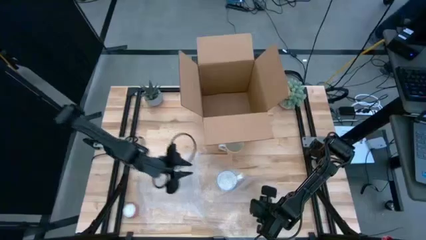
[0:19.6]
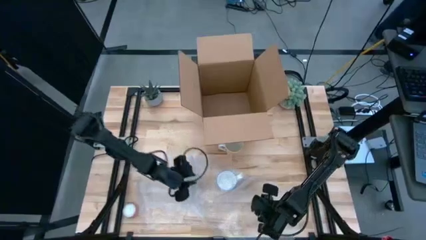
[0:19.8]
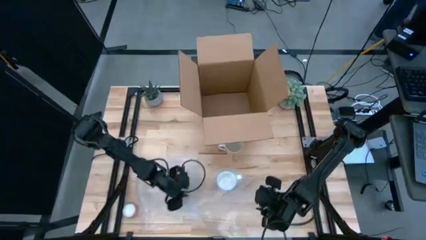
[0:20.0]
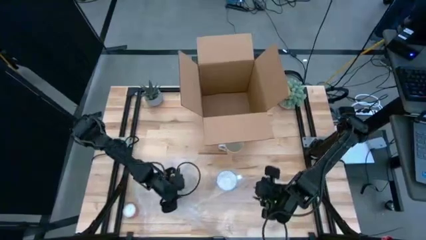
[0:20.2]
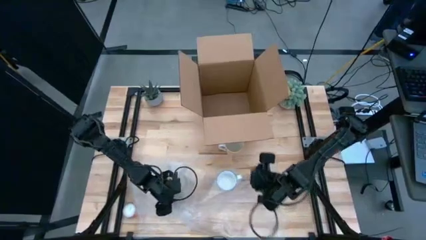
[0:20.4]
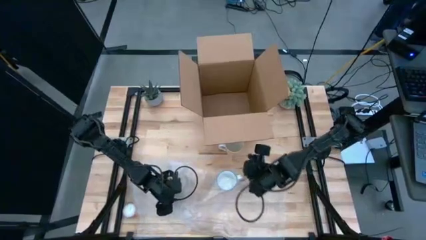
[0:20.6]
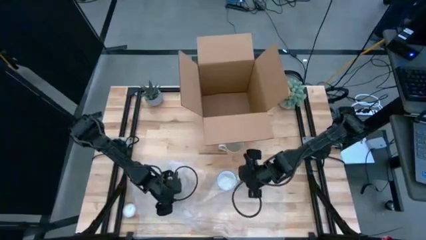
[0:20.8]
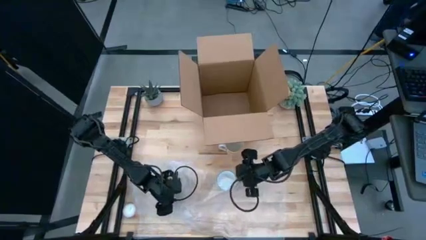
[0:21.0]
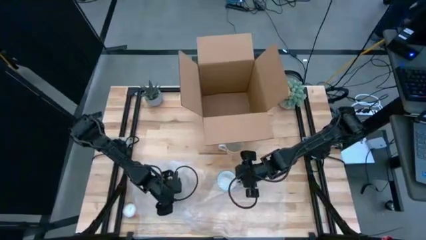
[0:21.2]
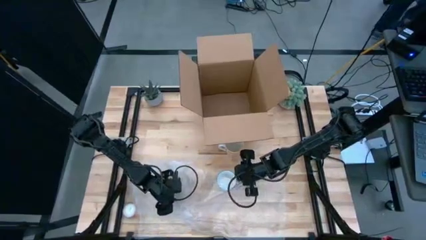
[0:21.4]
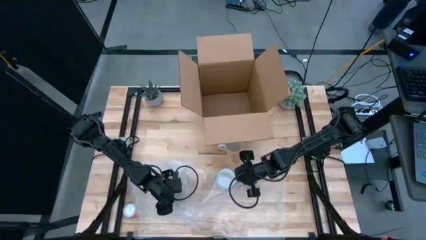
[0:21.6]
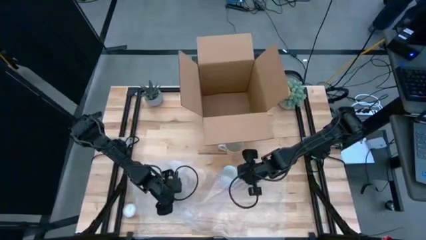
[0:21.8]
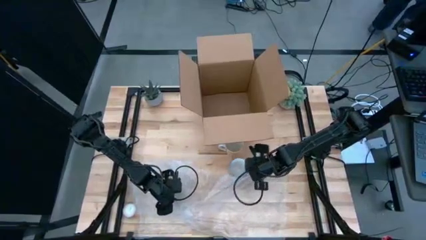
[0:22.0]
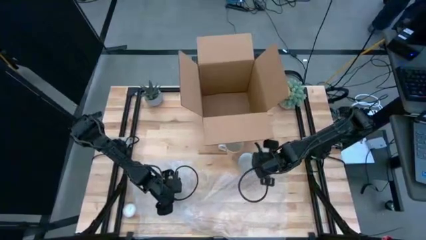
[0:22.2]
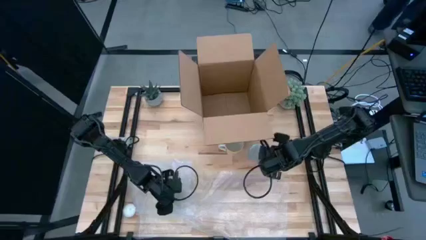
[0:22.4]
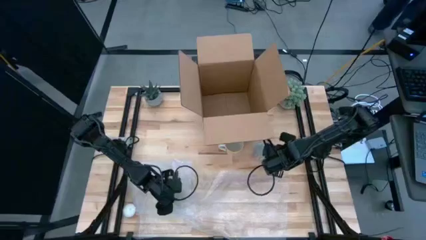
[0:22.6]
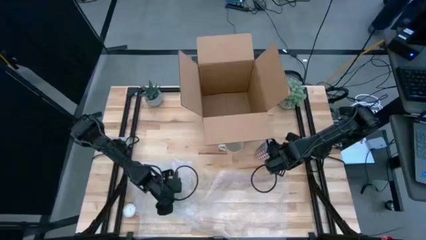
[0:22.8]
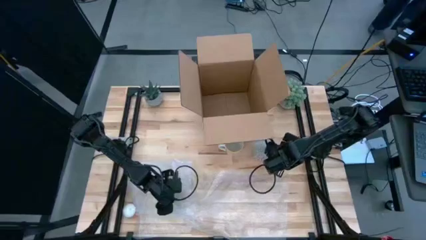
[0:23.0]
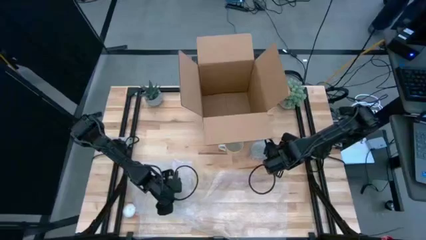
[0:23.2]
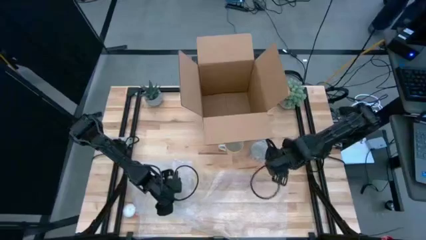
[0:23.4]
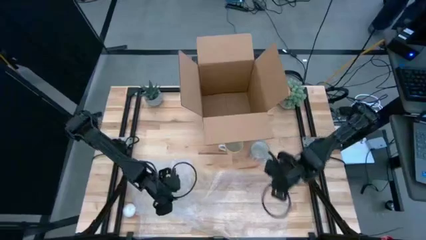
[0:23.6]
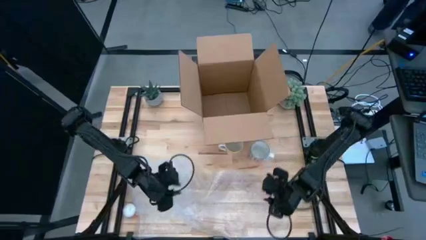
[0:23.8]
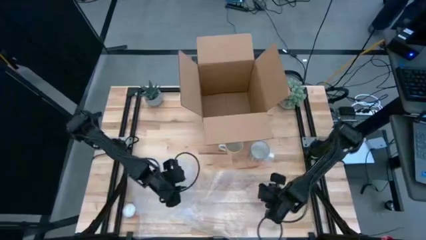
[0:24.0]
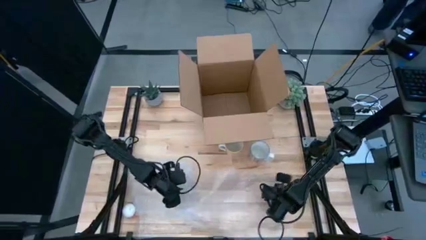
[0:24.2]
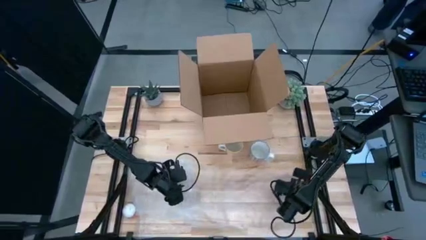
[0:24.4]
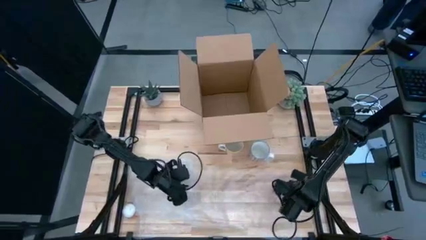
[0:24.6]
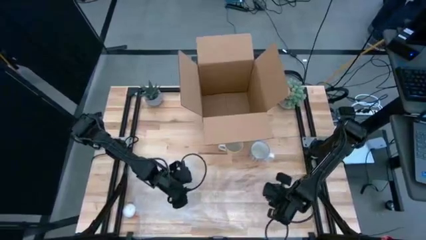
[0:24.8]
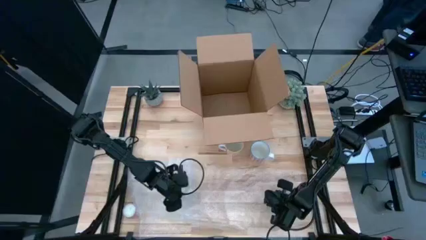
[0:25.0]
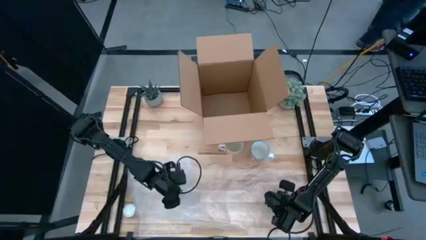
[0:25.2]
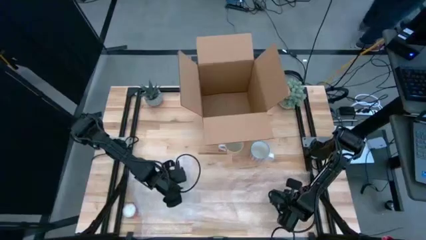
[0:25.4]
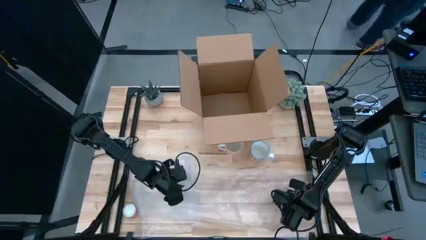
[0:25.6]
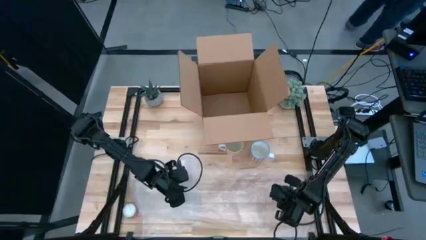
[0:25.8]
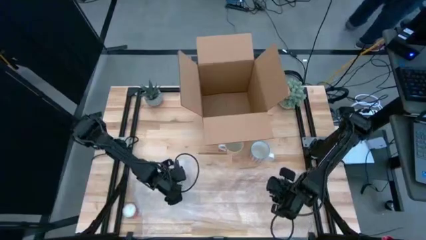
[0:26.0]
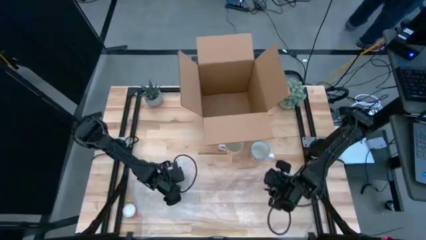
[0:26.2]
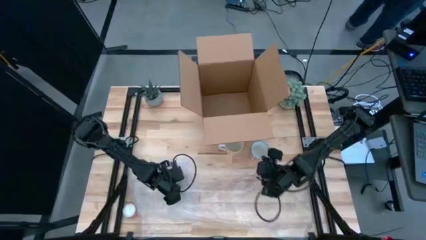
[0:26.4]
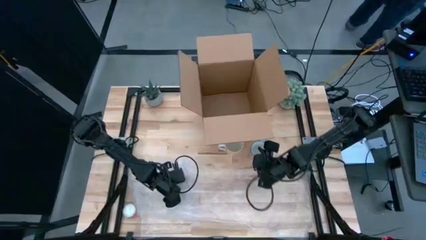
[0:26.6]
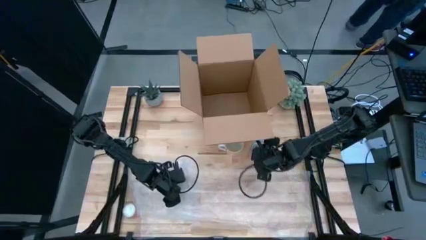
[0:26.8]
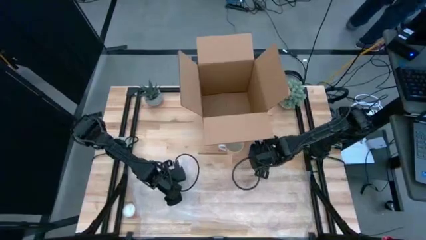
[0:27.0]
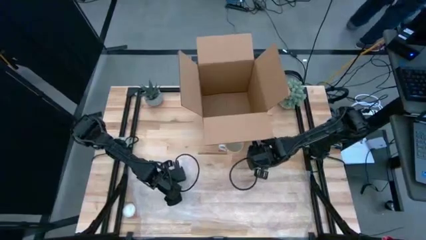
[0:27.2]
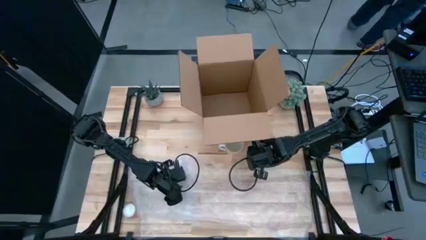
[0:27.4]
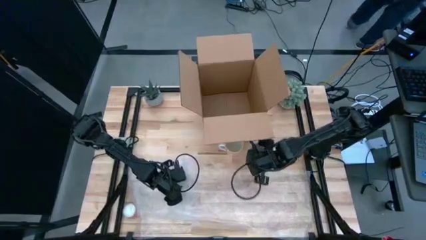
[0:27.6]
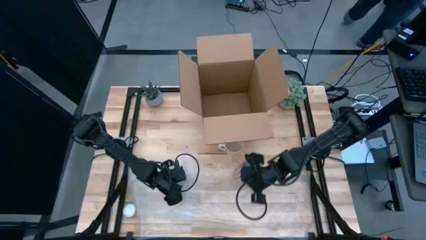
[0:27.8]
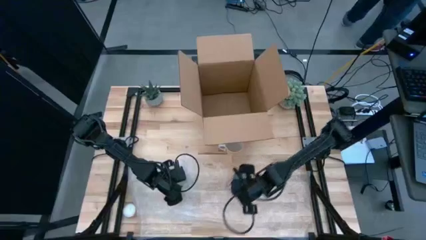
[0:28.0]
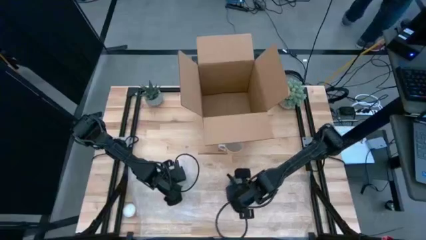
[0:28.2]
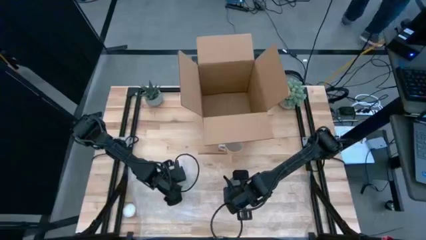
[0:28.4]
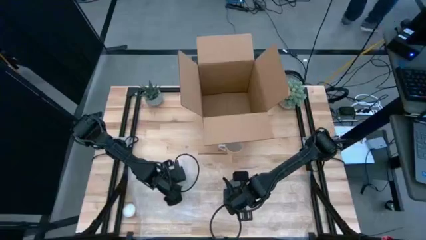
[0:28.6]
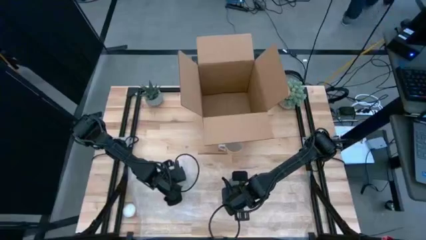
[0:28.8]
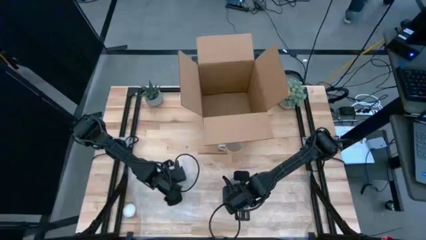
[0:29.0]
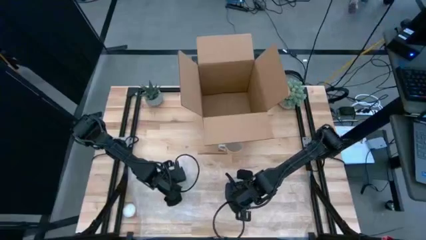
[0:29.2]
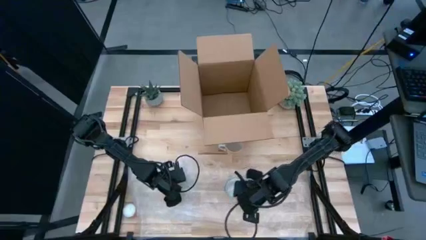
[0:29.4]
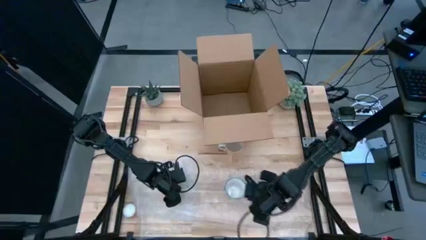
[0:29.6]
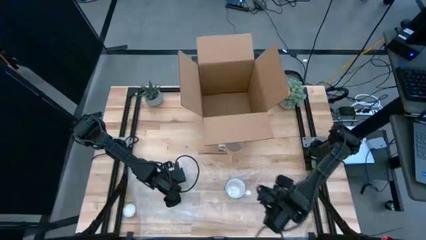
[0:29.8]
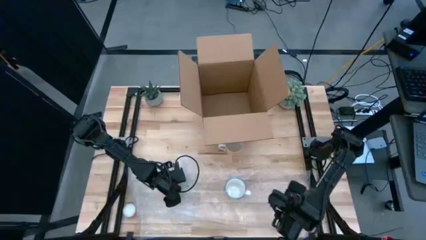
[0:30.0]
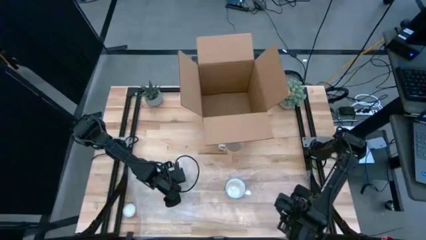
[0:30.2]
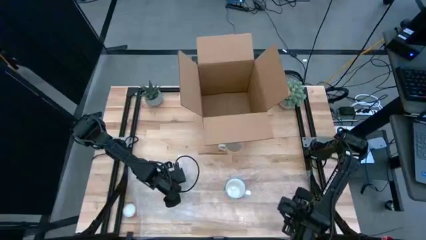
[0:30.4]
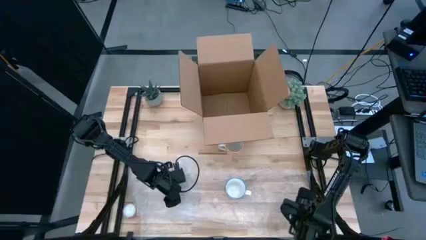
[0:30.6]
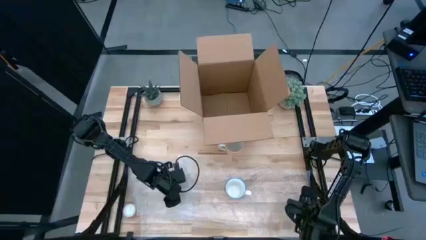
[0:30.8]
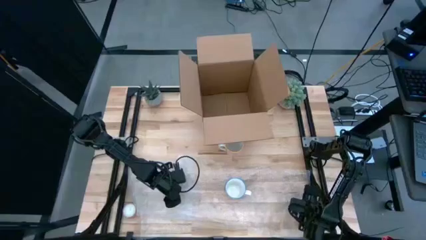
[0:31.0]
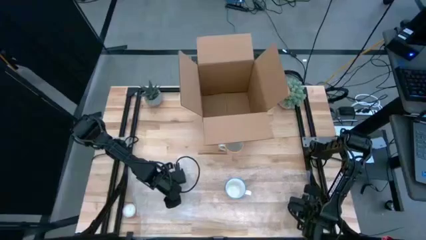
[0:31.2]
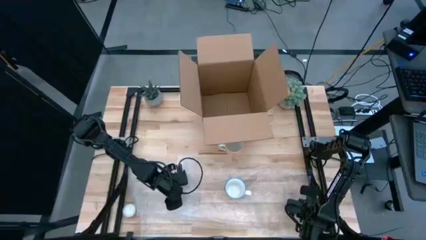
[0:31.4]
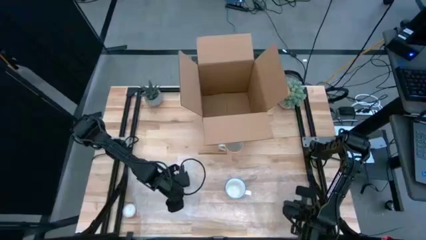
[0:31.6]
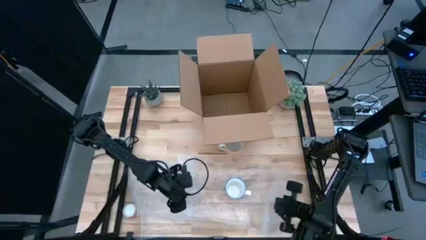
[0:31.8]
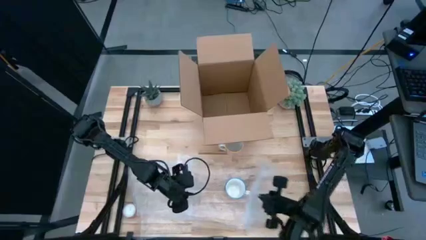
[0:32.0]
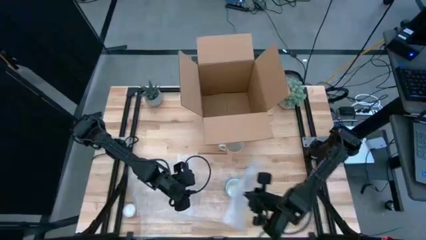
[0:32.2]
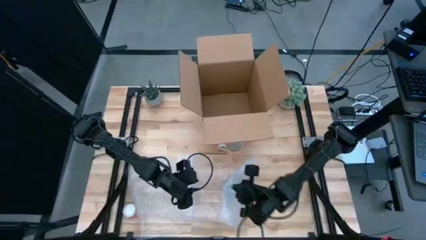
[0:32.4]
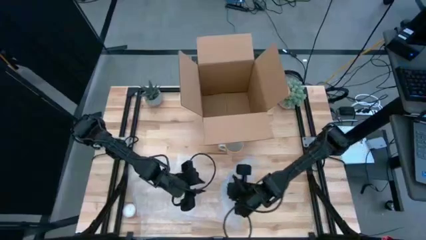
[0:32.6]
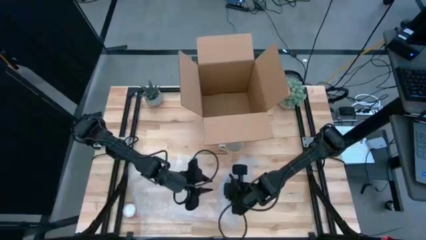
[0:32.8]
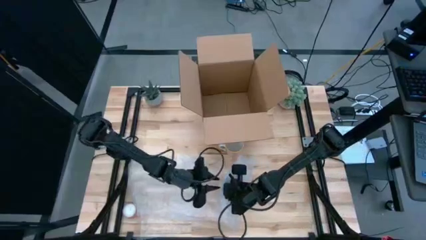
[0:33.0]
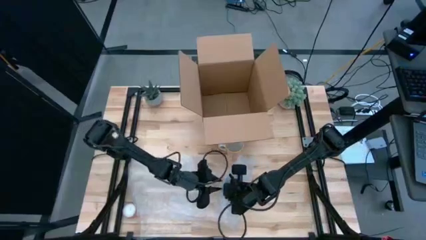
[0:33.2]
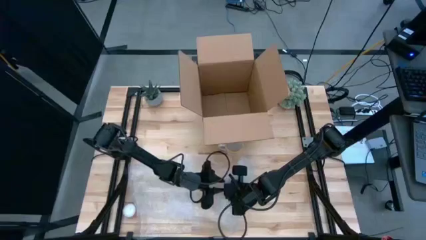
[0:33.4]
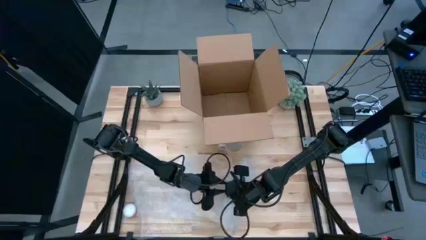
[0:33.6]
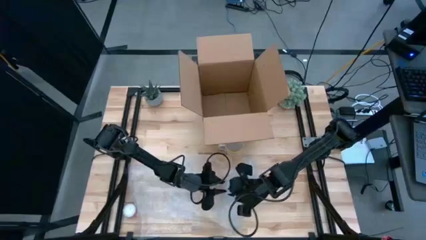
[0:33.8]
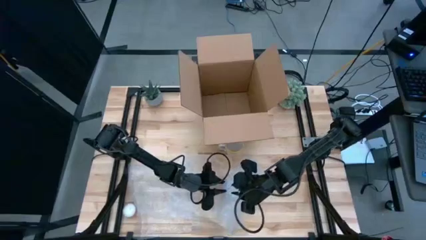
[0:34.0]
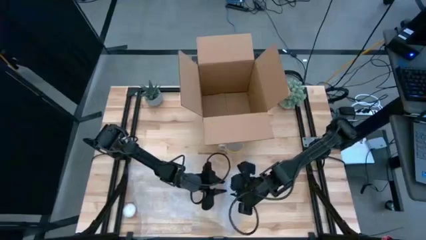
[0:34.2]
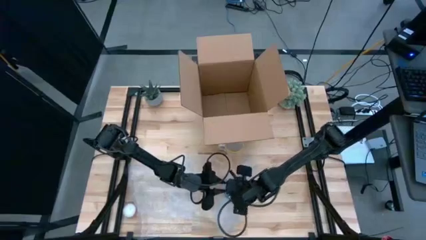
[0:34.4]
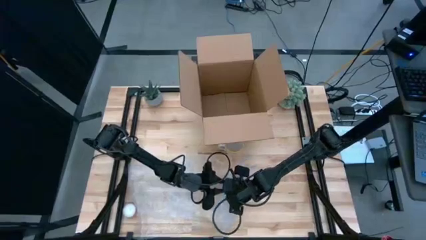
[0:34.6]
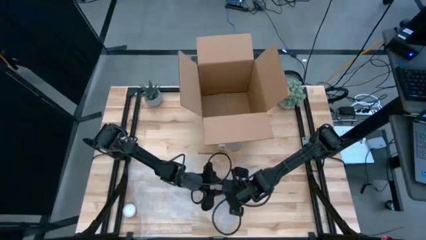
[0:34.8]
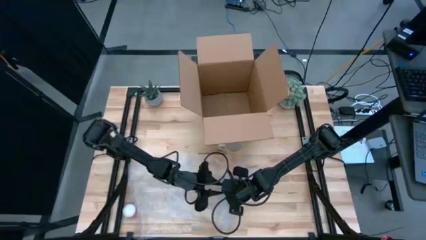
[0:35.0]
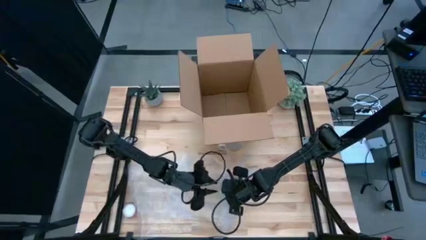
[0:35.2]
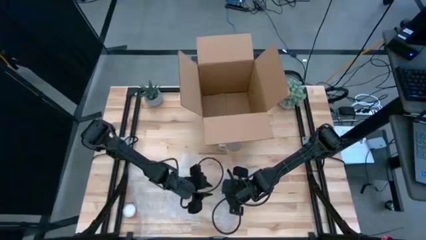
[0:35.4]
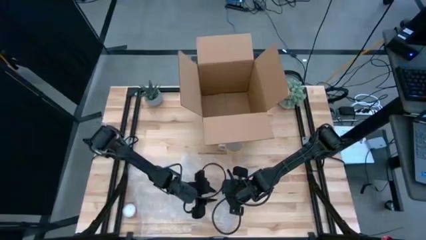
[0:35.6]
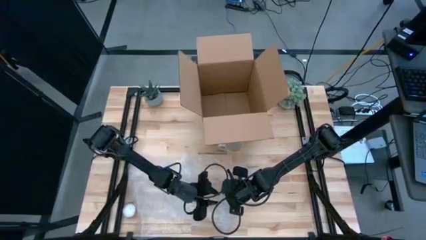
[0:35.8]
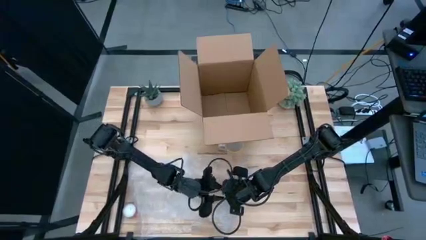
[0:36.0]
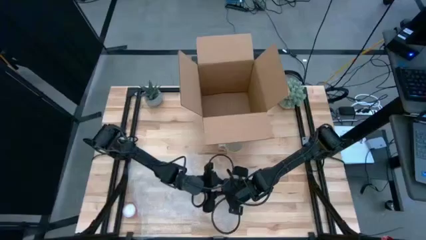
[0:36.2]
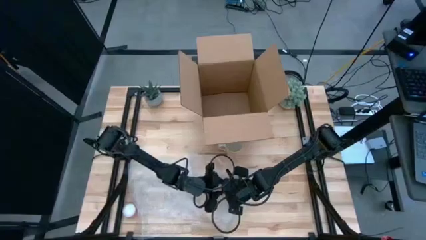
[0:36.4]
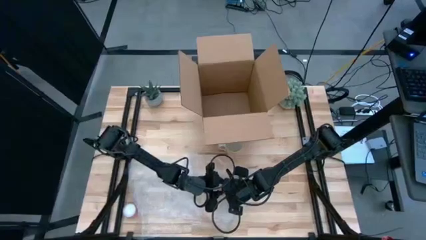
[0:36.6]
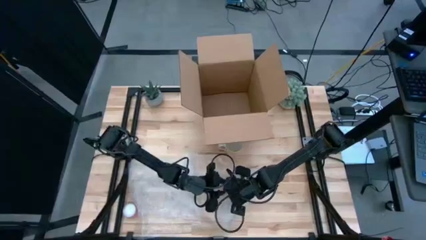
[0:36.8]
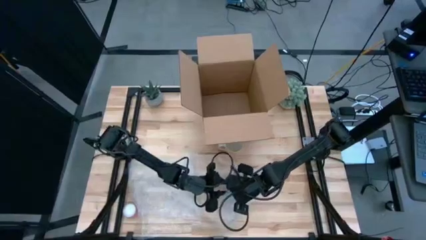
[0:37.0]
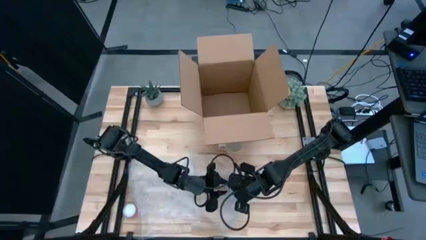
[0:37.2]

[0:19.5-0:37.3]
Task: wrap mug
Wrap the red mug with the right transparent bubble wrap
